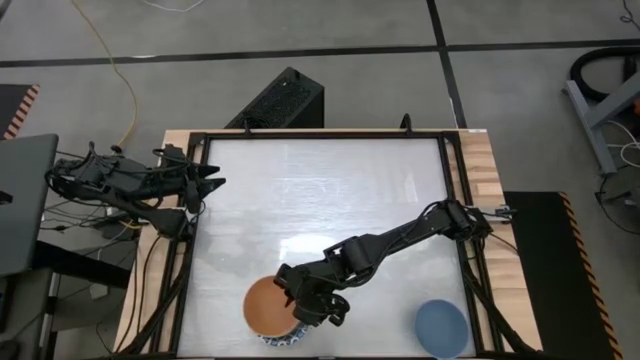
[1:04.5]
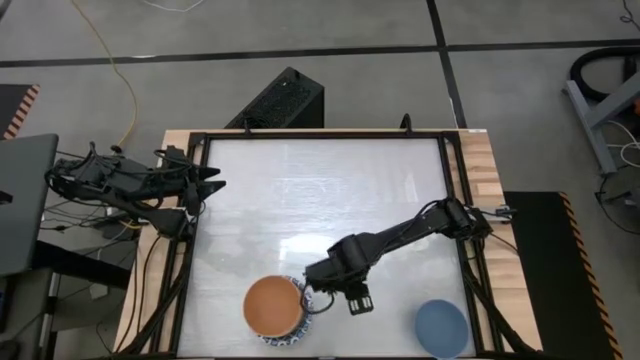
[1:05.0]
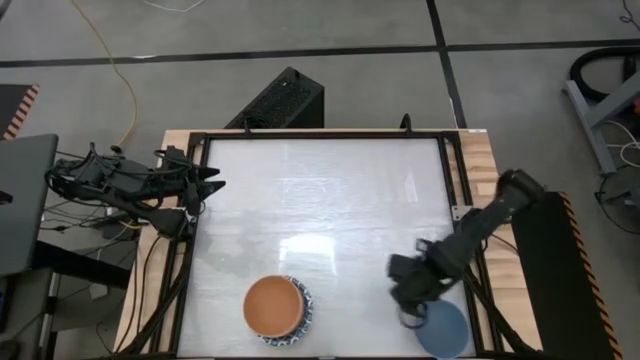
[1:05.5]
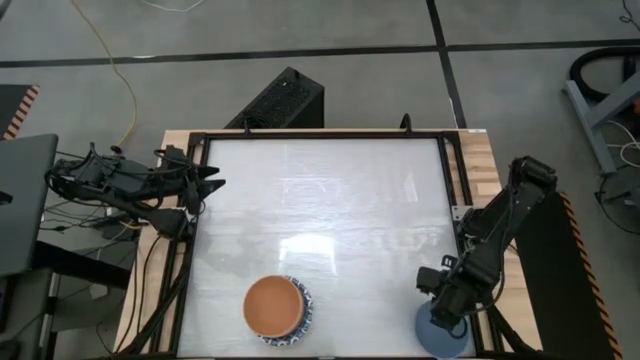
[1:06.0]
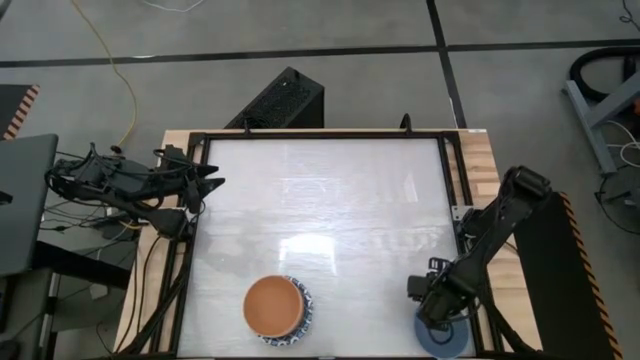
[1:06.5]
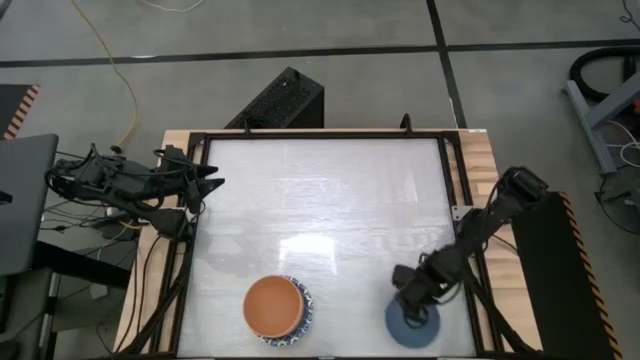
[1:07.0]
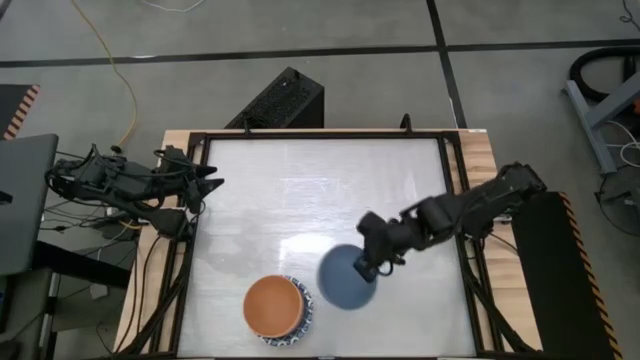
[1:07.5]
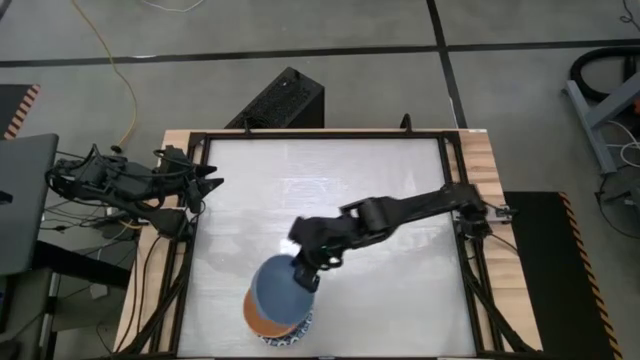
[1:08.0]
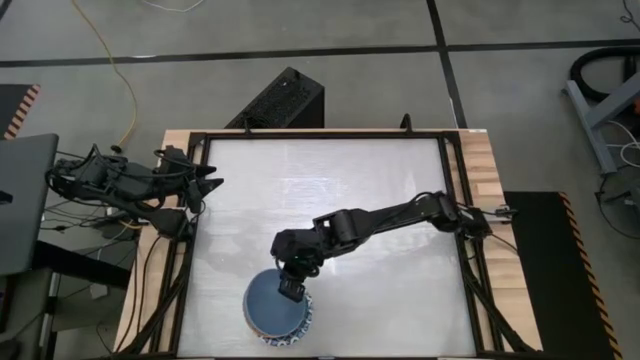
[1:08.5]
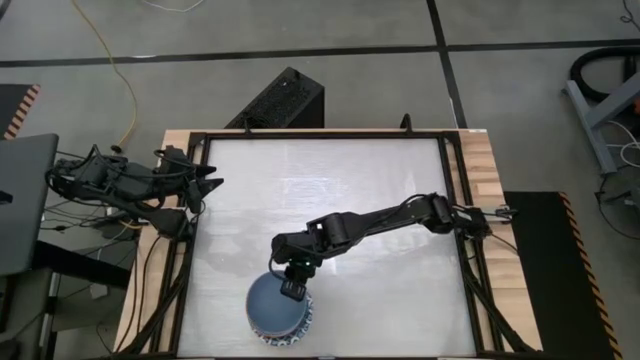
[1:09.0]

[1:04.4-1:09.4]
Stack the blue bowl on top of the yellow bowl

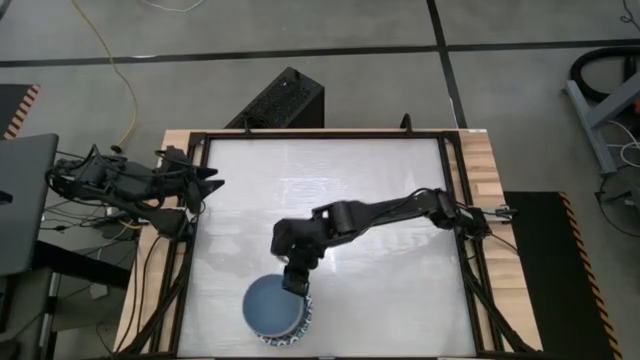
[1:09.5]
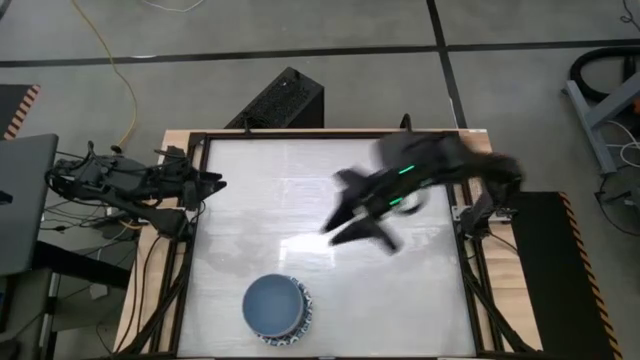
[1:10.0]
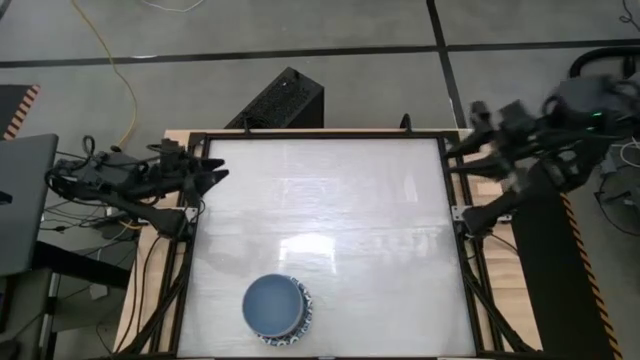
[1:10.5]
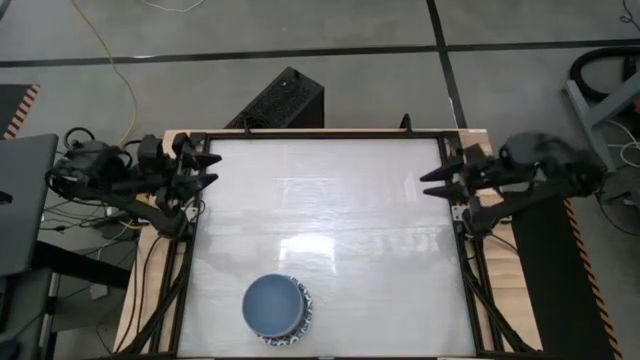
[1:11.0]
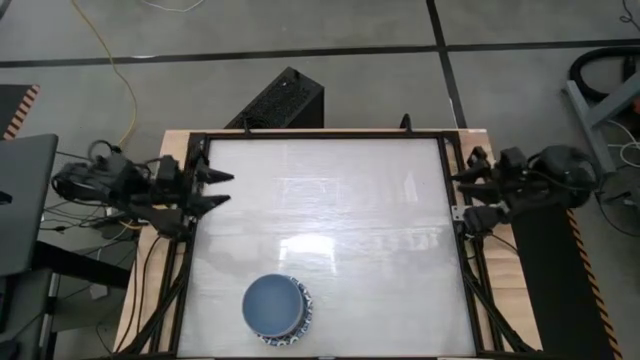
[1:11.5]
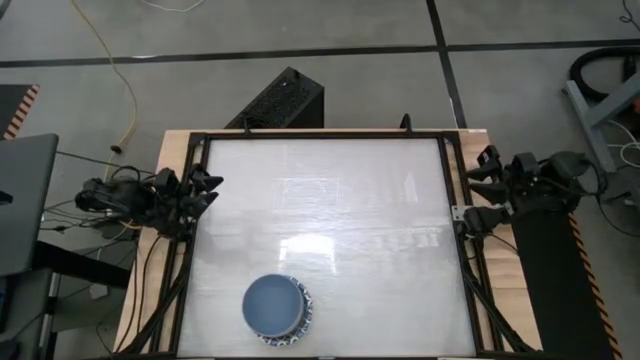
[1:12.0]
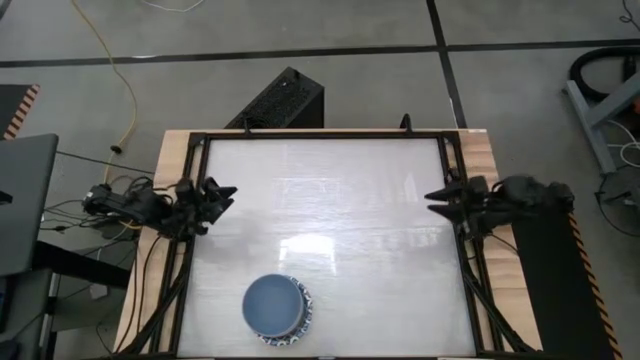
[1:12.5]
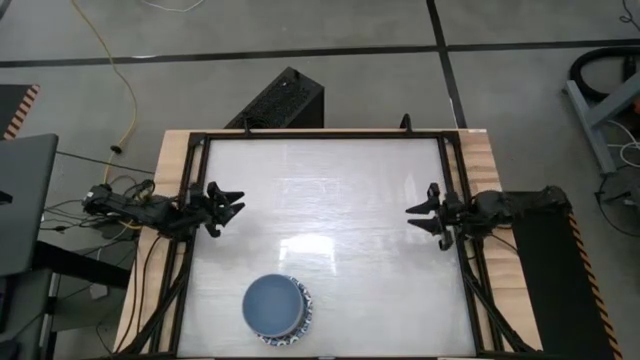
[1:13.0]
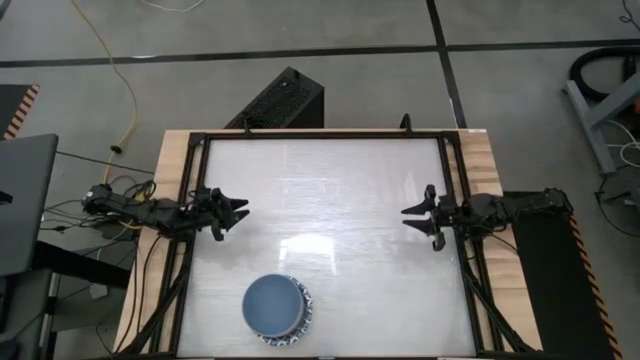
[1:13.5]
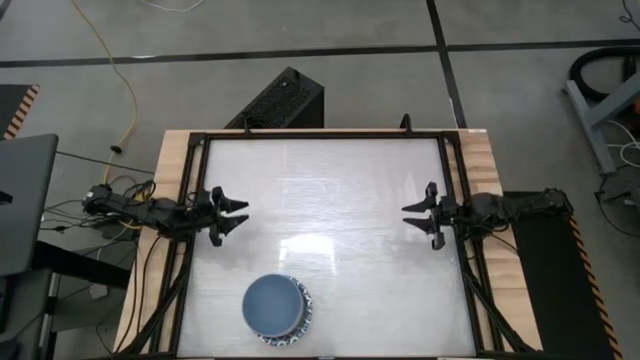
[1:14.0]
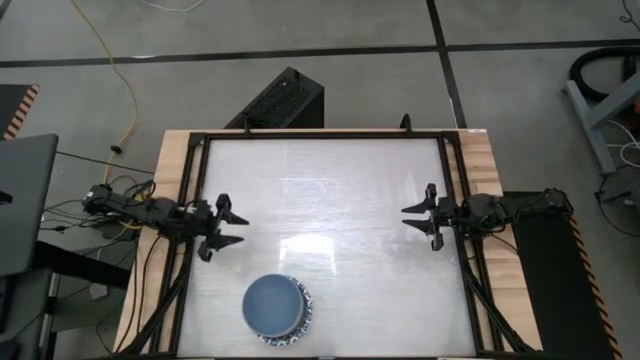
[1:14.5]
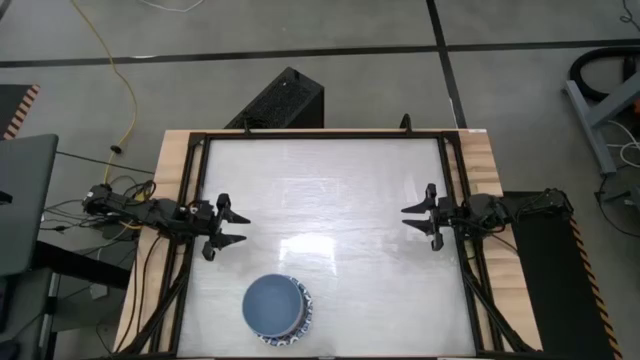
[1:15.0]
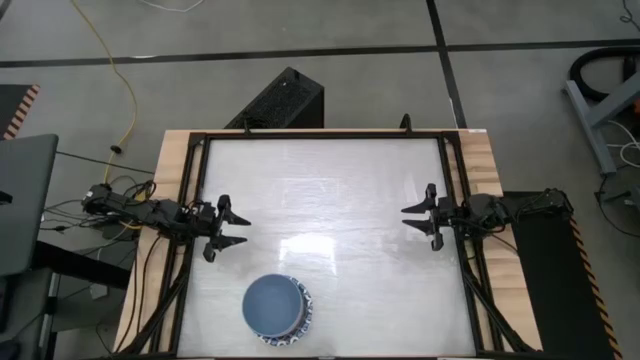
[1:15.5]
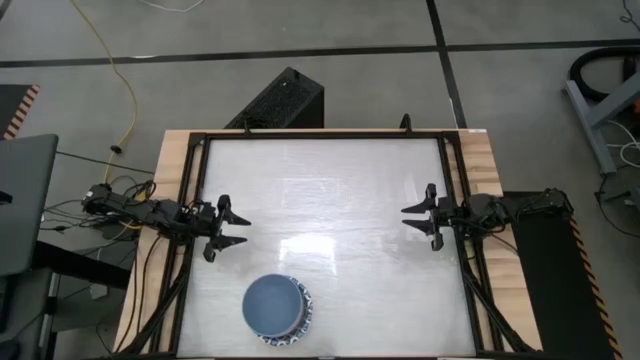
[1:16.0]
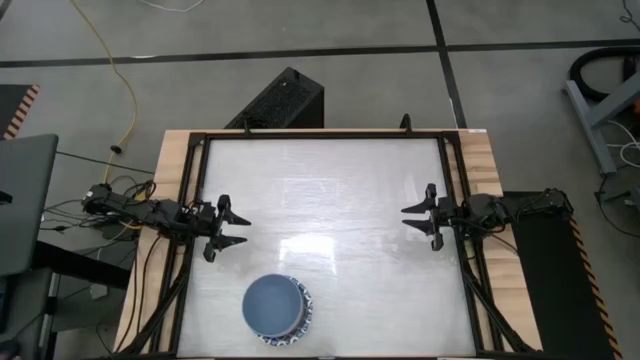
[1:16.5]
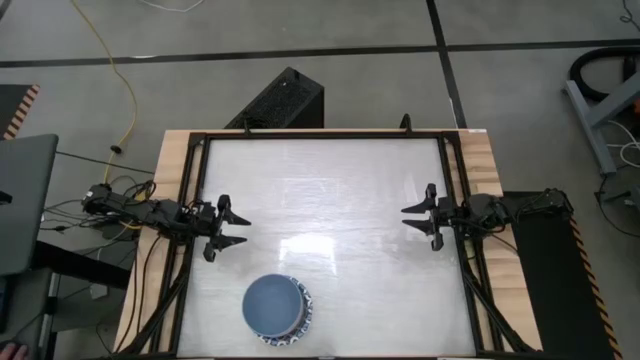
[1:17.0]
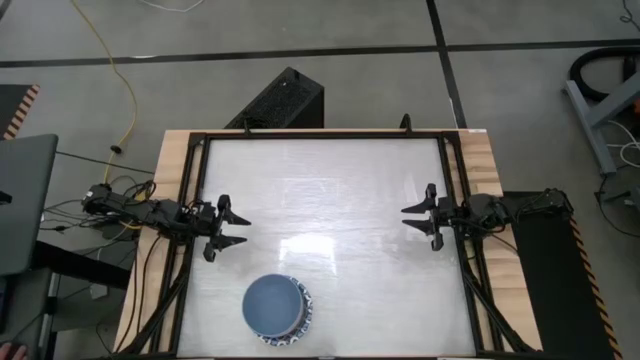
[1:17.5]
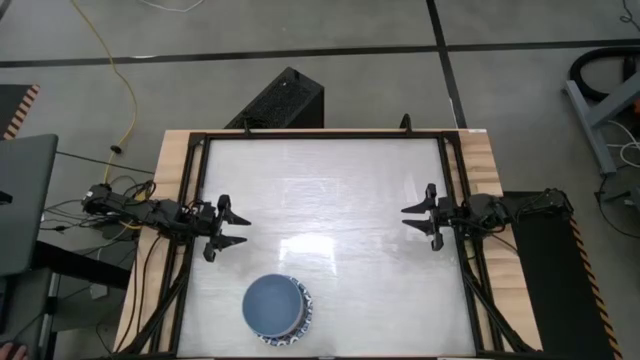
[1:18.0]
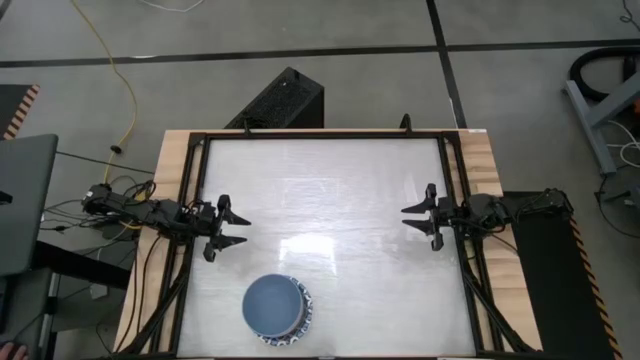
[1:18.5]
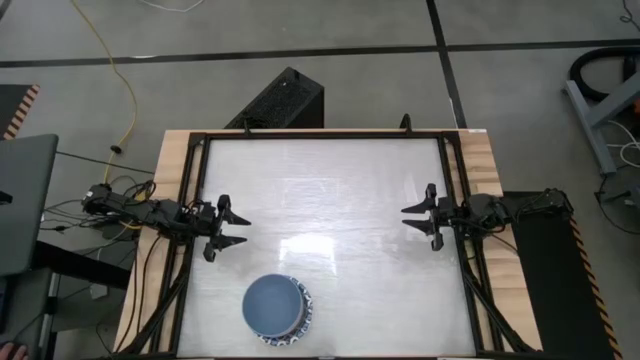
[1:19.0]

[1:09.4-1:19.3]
Return to Home Position
